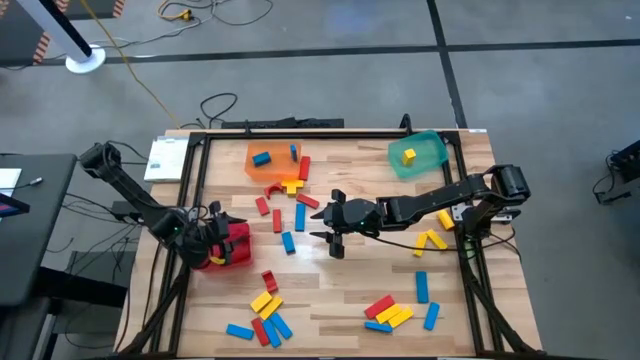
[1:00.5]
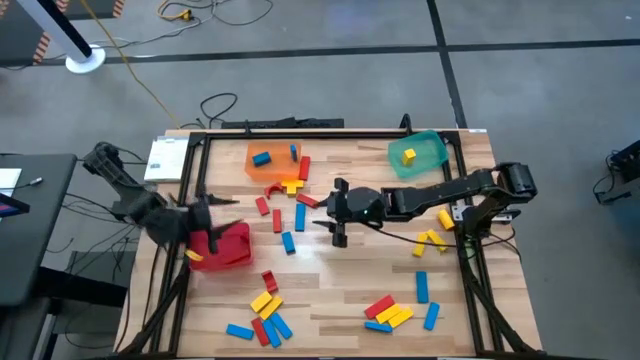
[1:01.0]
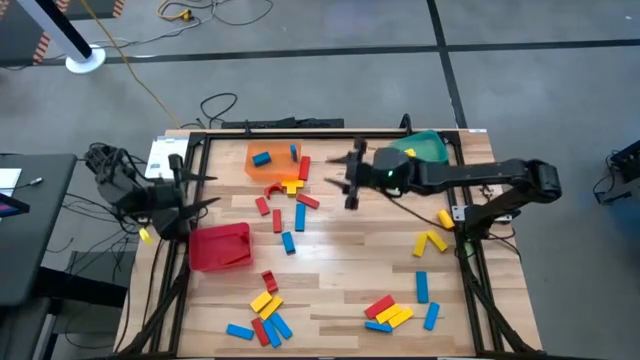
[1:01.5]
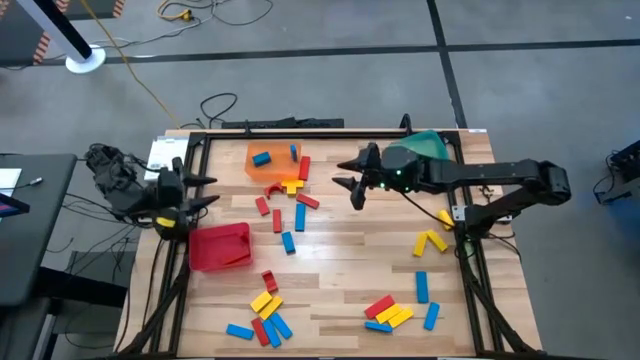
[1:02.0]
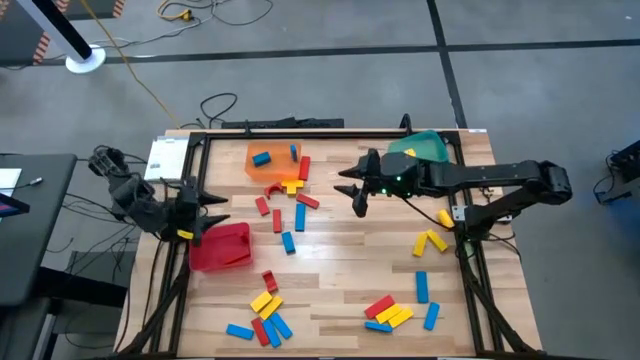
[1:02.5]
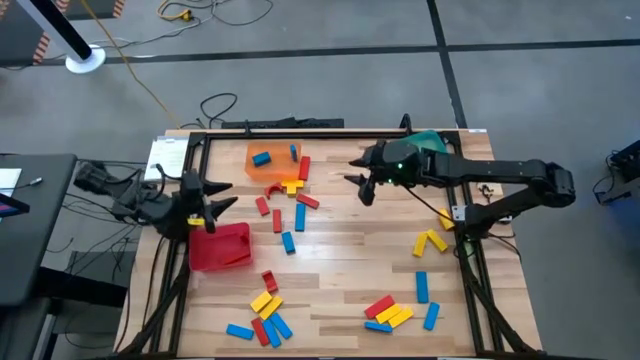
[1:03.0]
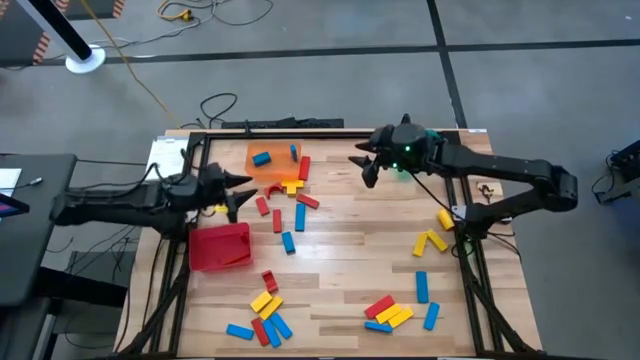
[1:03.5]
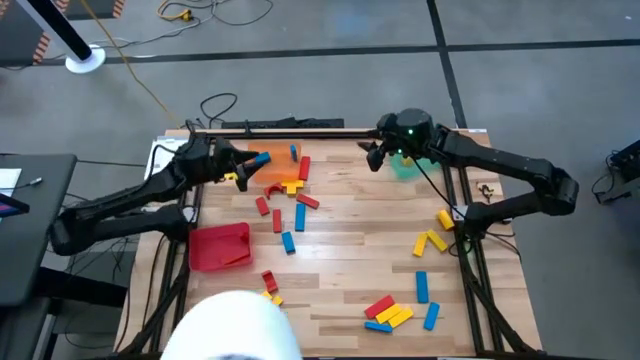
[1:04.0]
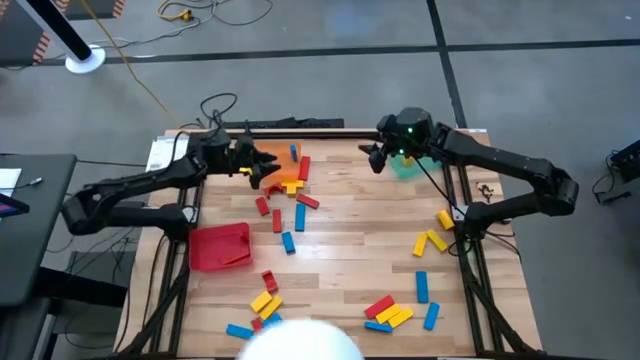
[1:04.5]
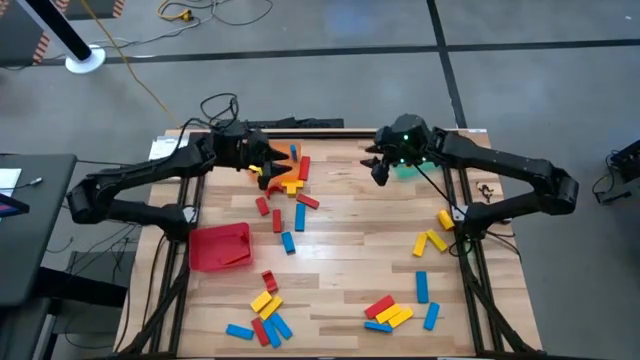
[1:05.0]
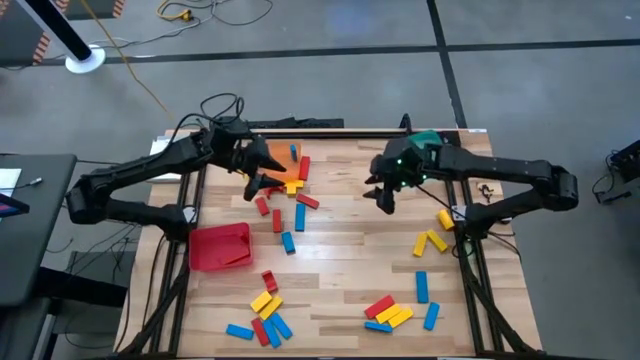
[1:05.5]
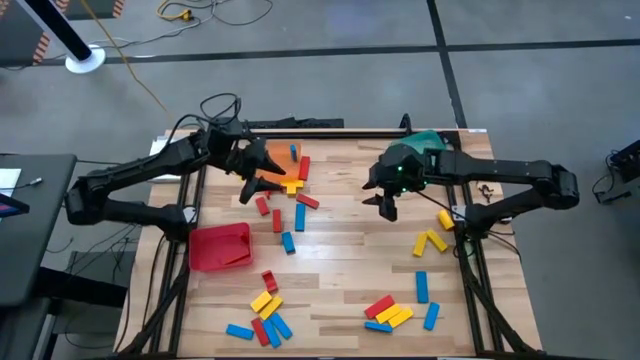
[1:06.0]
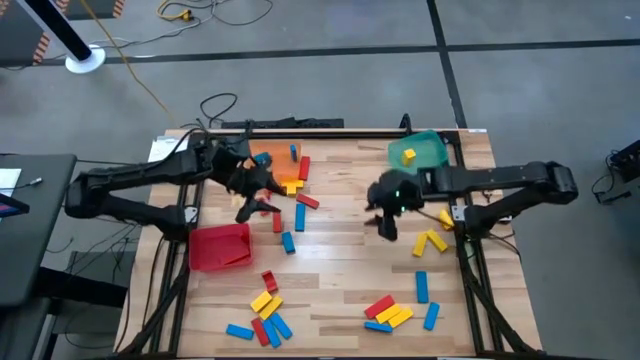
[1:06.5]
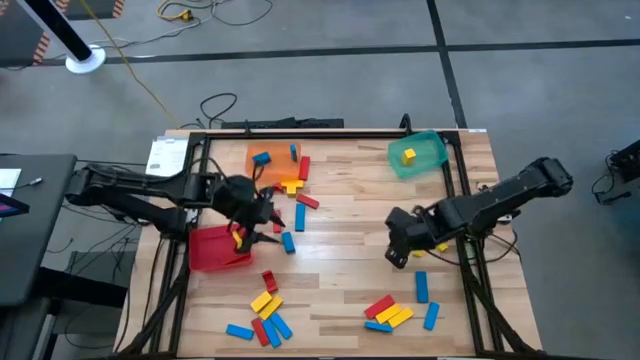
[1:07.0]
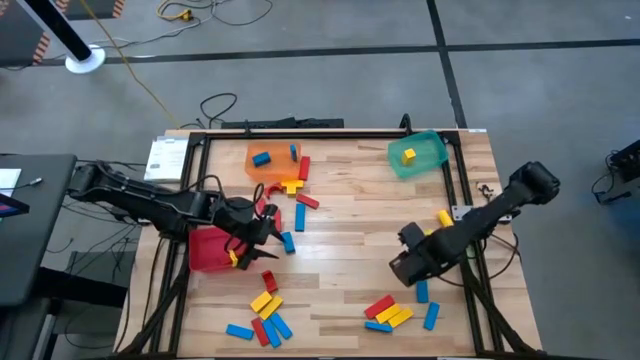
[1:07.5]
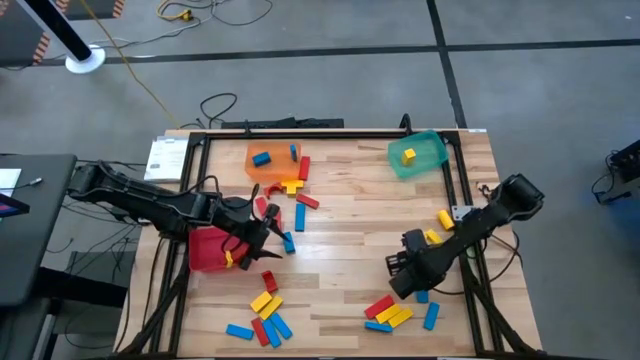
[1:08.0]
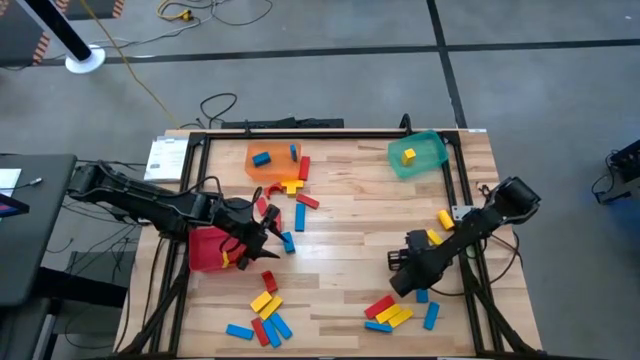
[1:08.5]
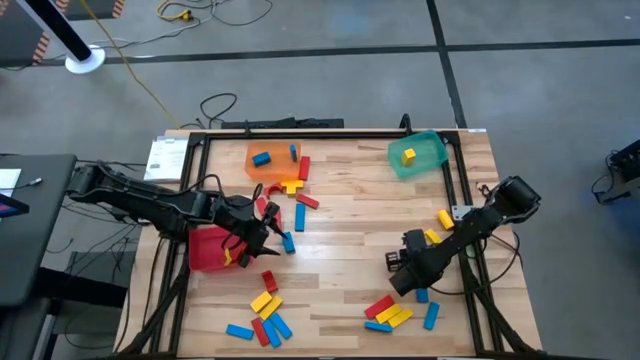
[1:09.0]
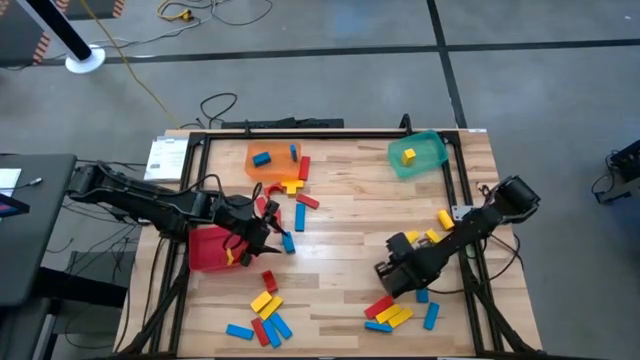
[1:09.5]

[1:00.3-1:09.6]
Task: Sort blocks
Put the yellow block into the blue bin

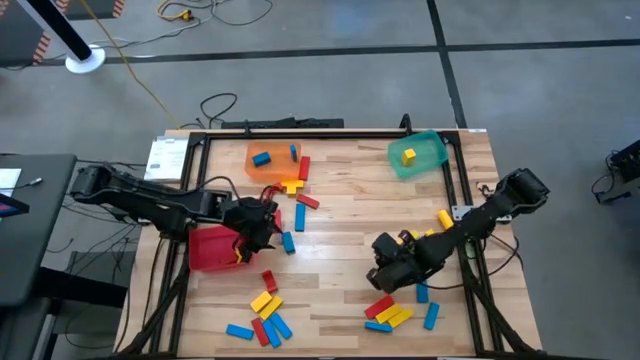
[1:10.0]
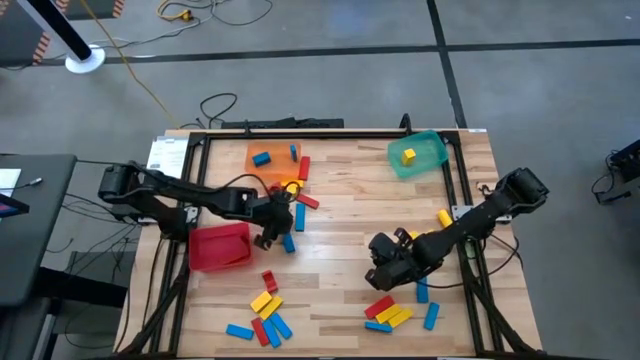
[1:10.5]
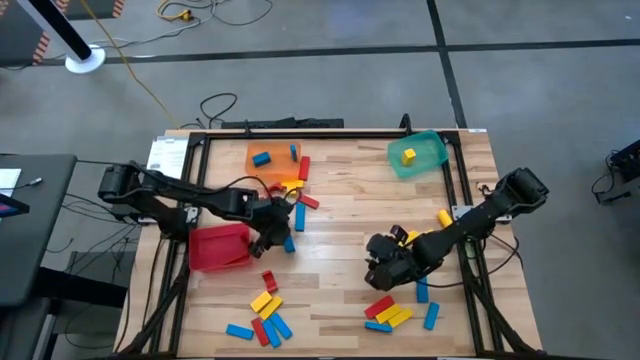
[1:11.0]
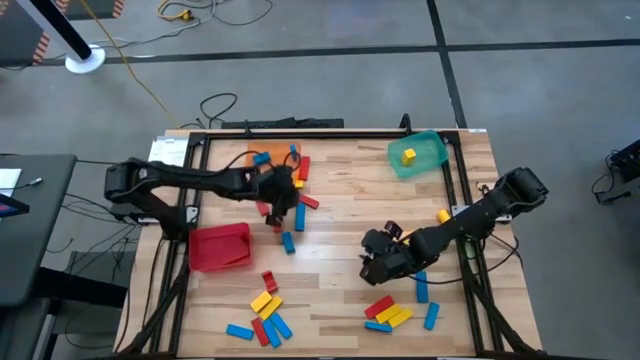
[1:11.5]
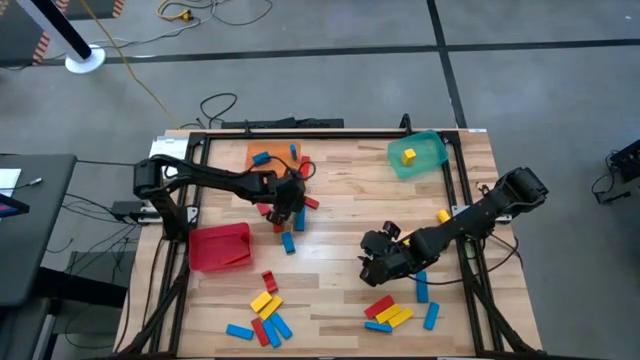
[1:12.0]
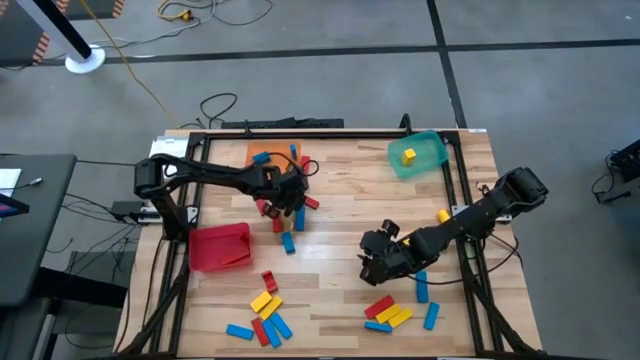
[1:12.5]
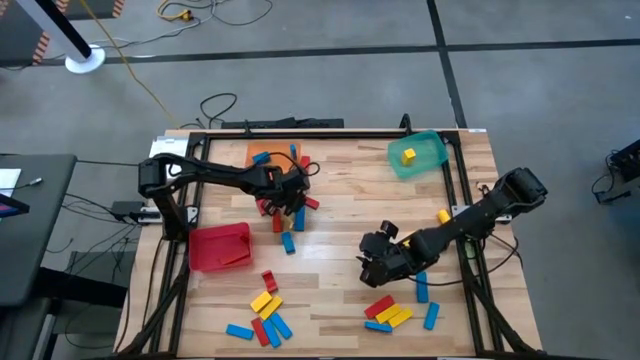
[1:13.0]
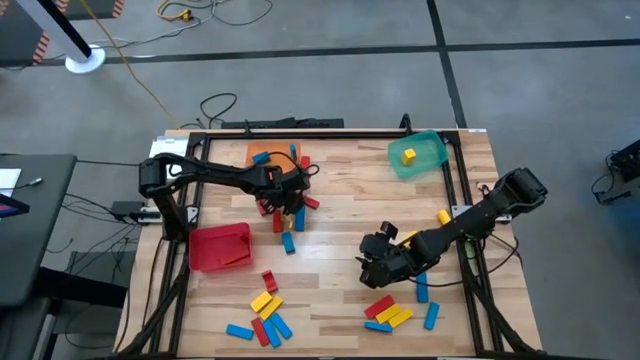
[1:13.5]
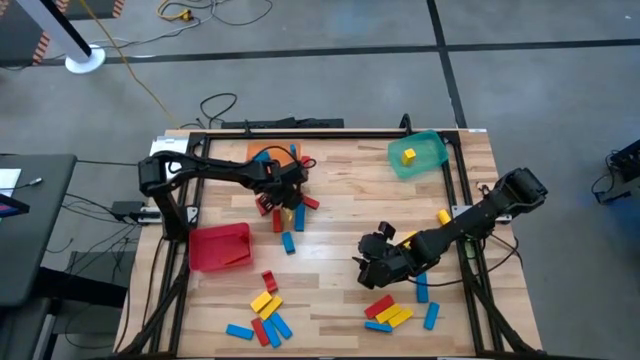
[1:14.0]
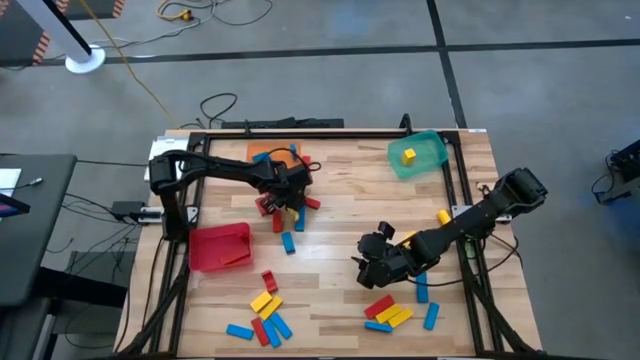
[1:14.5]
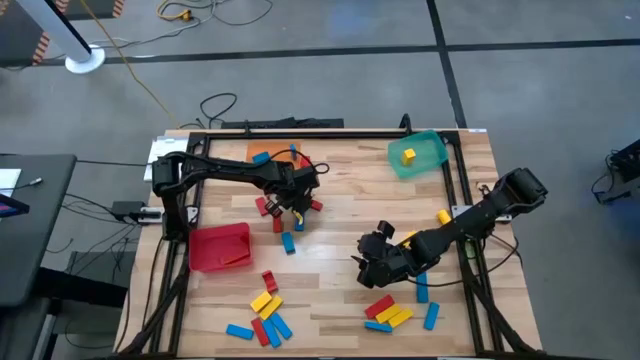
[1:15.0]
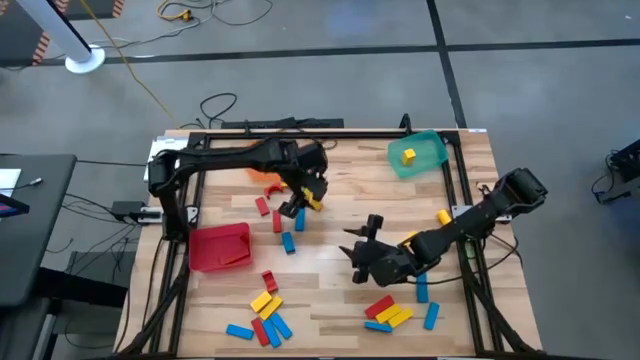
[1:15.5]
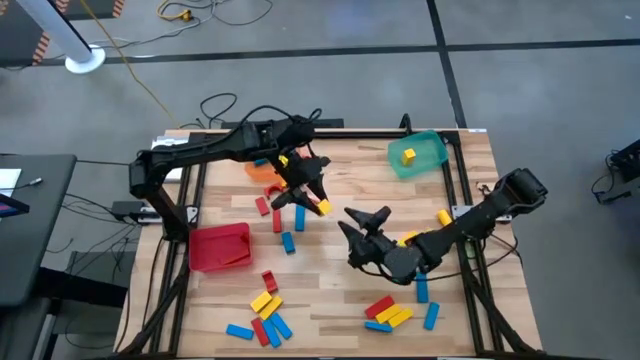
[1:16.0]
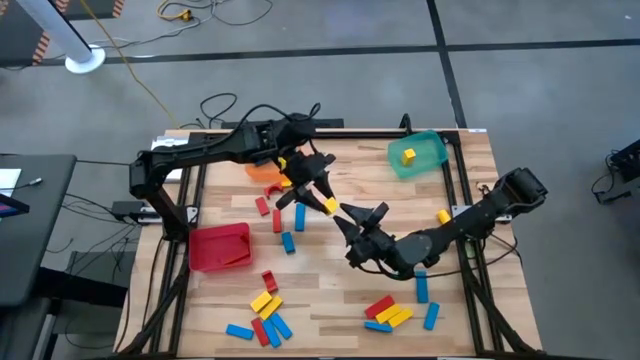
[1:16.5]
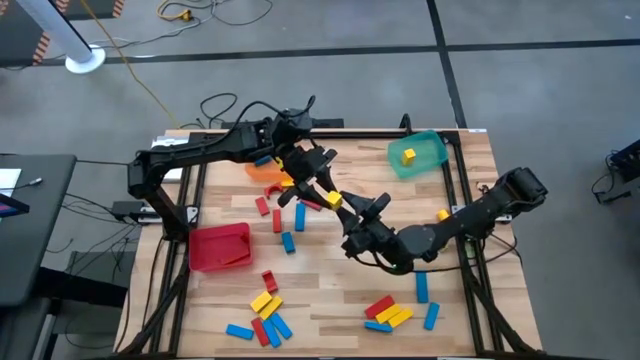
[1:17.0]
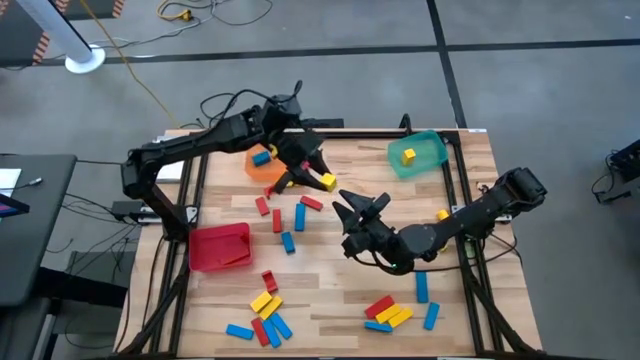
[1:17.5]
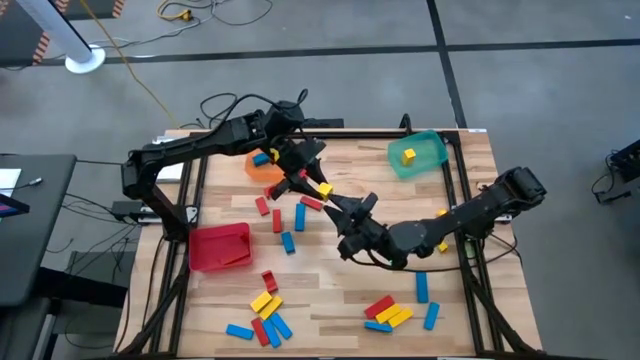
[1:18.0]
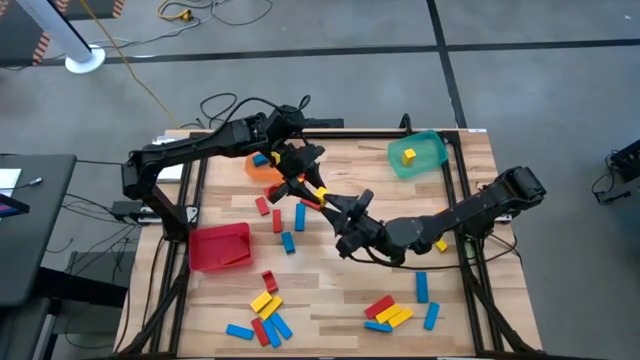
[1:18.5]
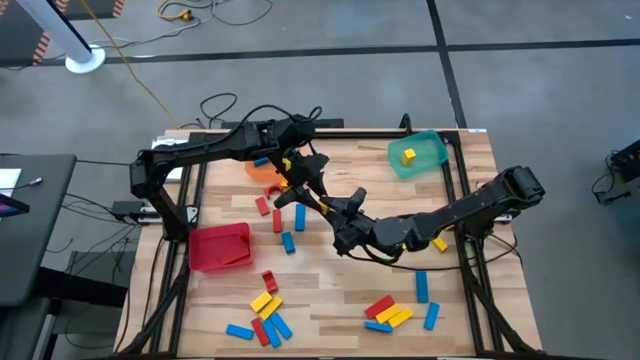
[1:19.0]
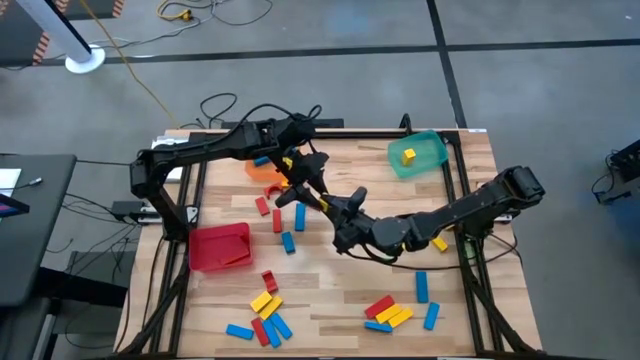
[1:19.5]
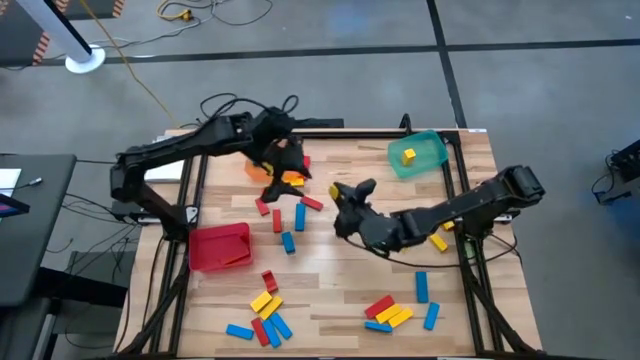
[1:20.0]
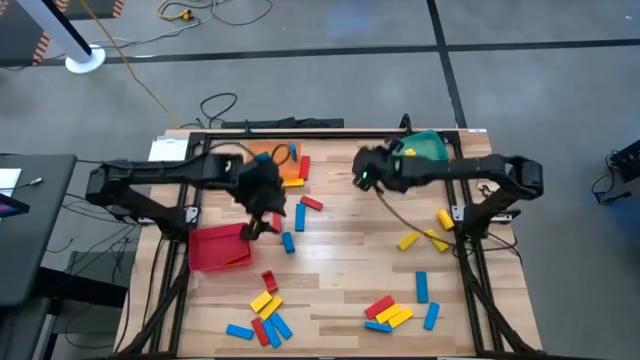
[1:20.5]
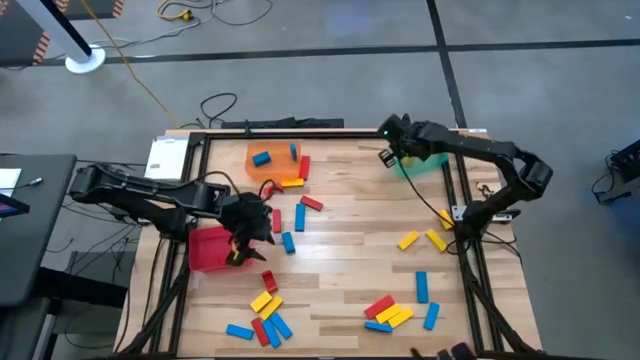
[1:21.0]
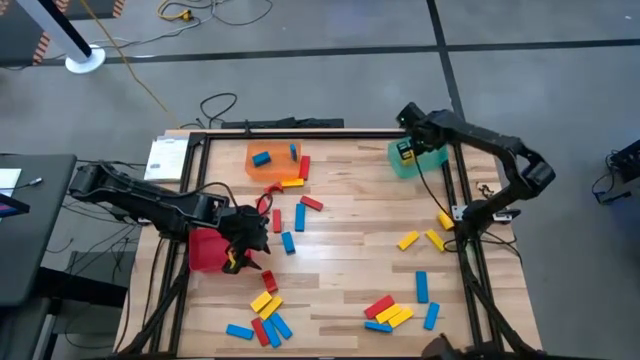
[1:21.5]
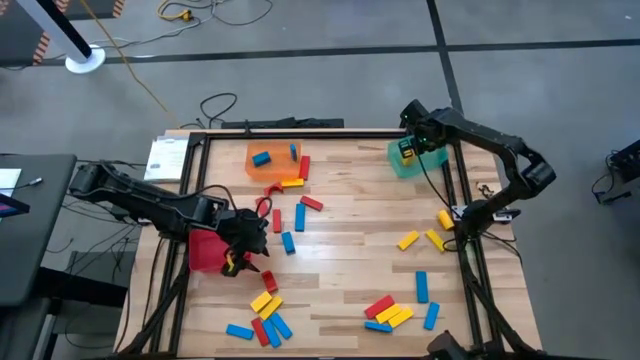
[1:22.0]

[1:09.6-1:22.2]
Put the yellow block into the blue bin
